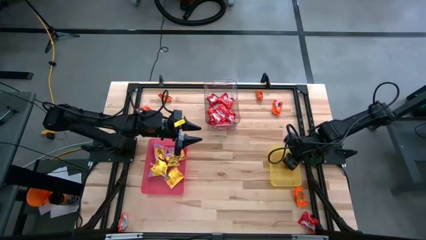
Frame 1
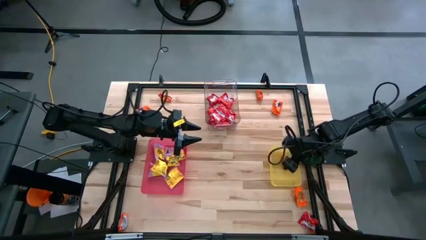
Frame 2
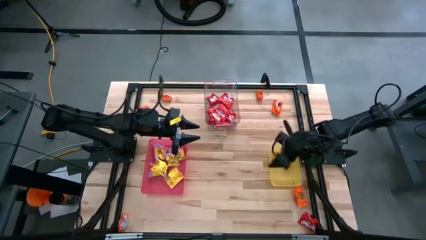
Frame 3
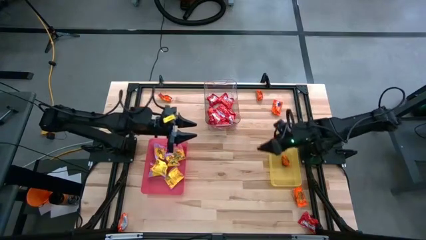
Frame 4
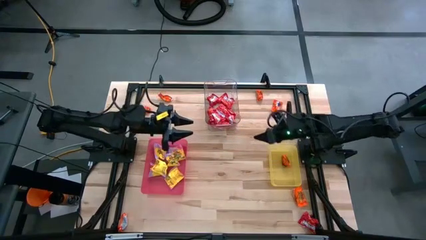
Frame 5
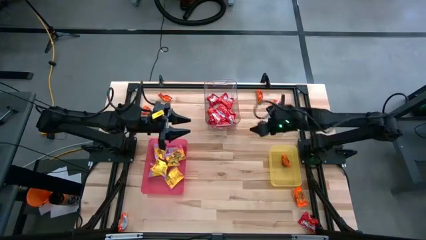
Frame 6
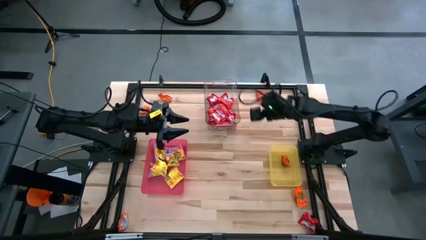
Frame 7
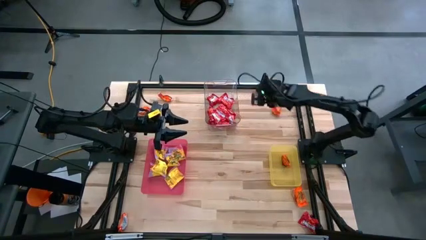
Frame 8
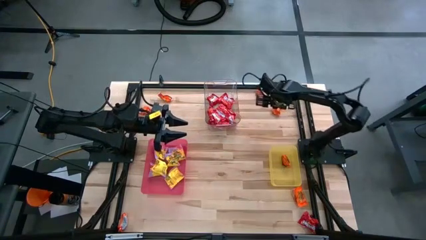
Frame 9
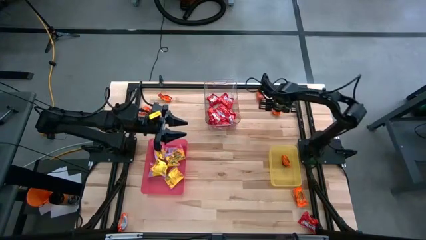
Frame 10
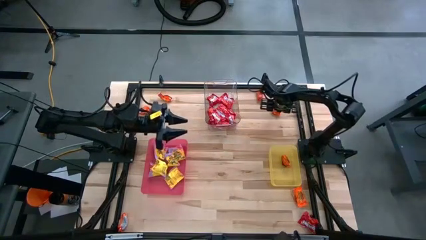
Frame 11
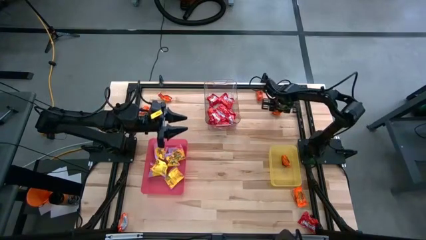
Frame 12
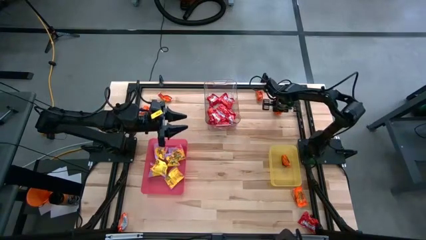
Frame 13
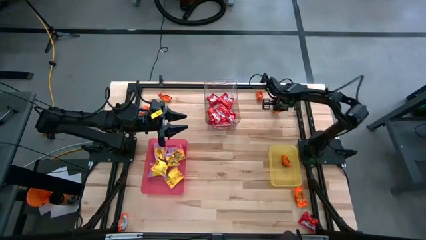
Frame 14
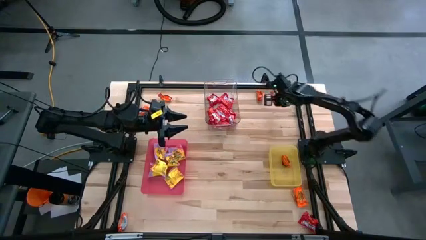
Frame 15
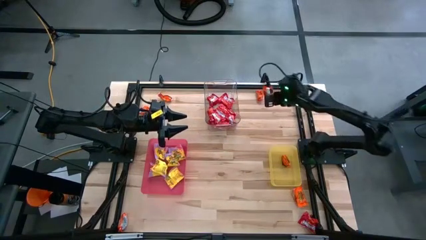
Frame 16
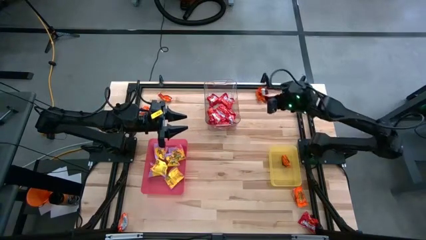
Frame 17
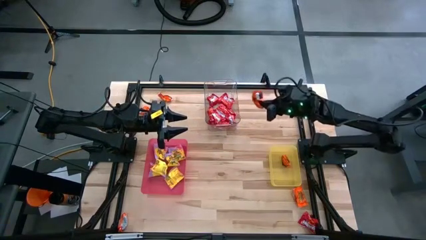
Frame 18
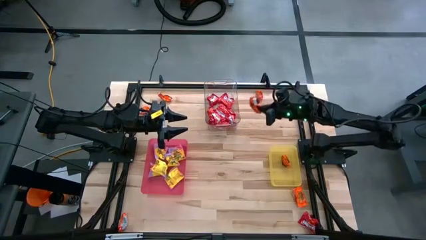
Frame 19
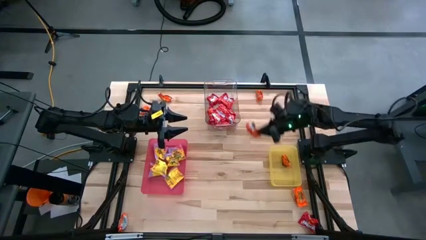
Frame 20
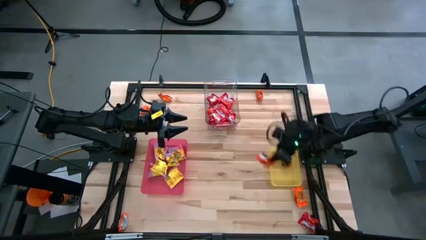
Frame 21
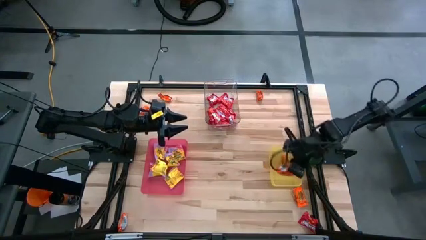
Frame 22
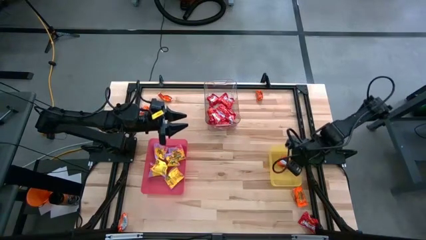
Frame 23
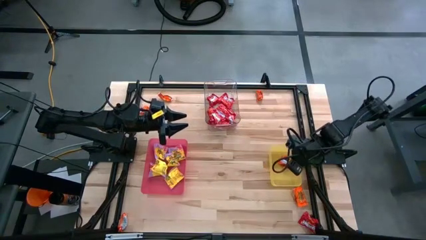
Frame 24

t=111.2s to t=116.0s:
Task: Sort candy
Put the orange candy into the yellow bin

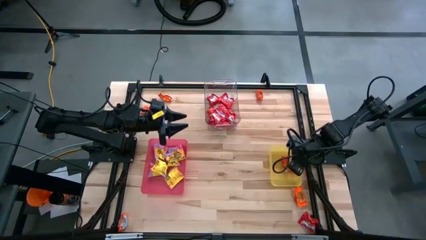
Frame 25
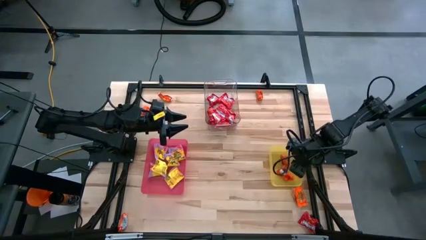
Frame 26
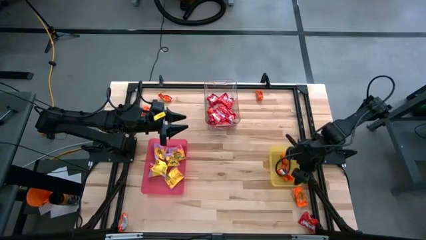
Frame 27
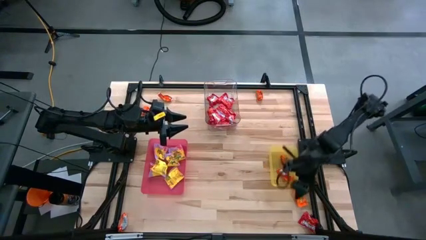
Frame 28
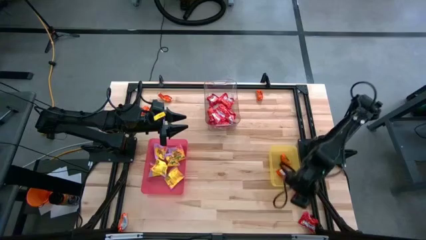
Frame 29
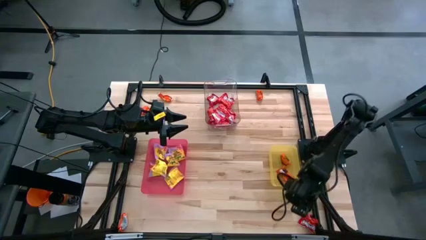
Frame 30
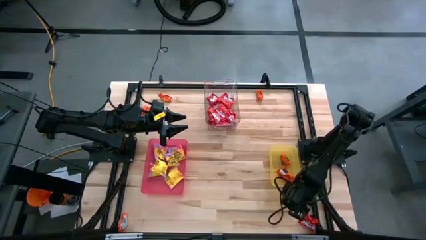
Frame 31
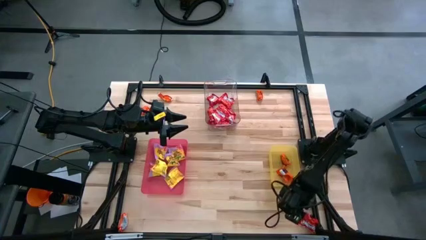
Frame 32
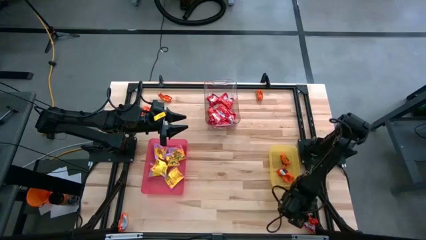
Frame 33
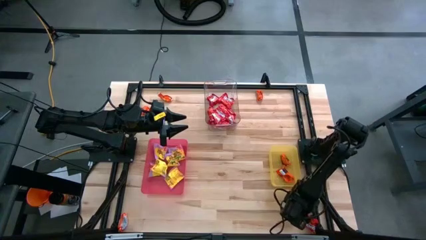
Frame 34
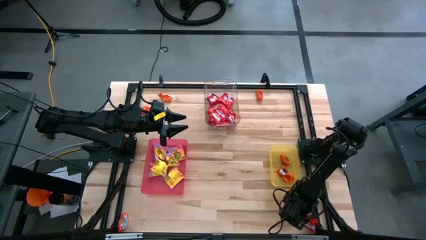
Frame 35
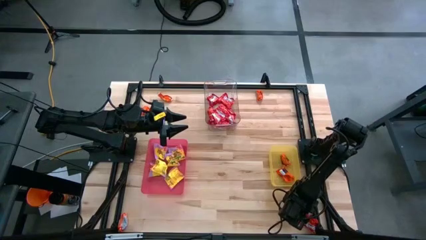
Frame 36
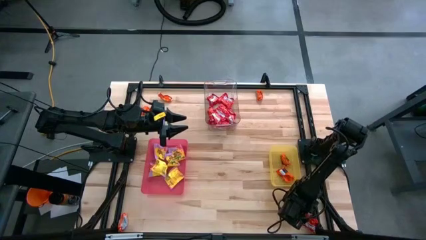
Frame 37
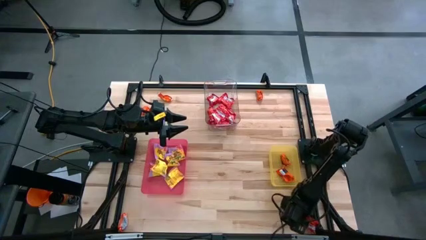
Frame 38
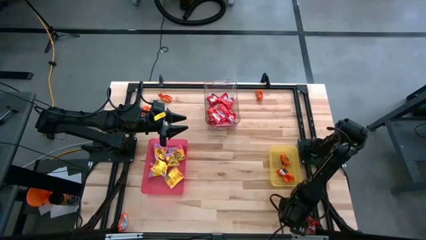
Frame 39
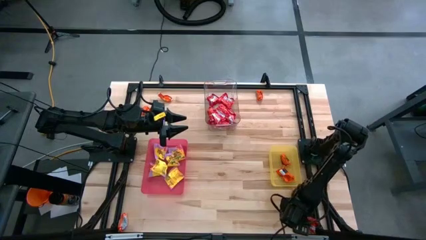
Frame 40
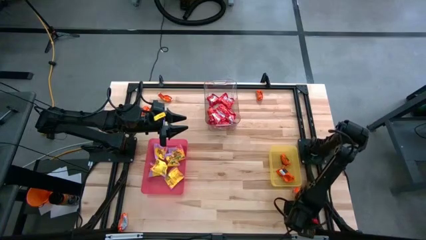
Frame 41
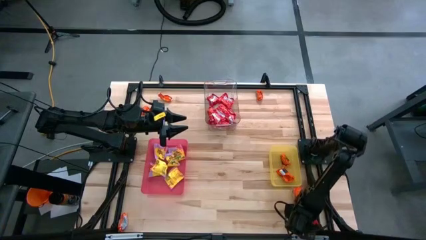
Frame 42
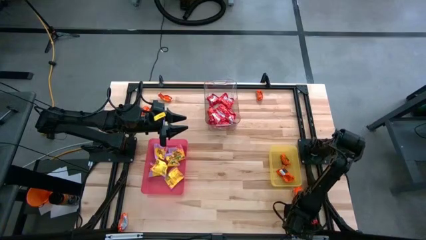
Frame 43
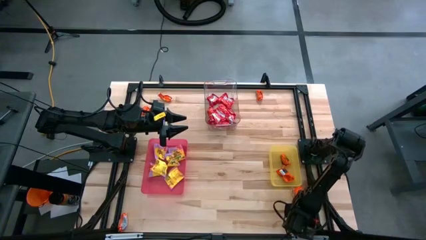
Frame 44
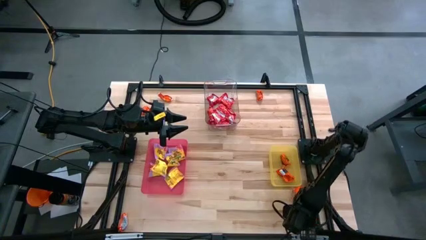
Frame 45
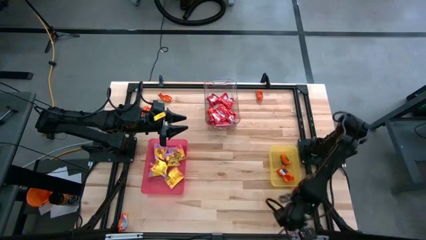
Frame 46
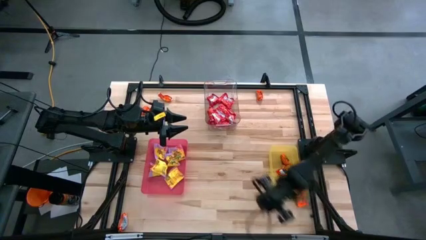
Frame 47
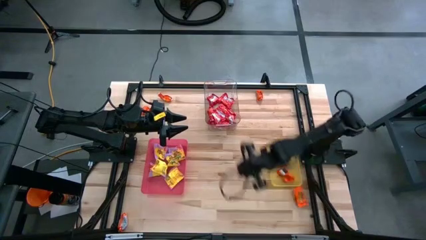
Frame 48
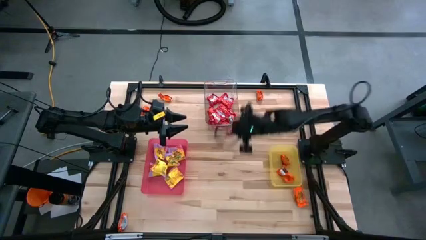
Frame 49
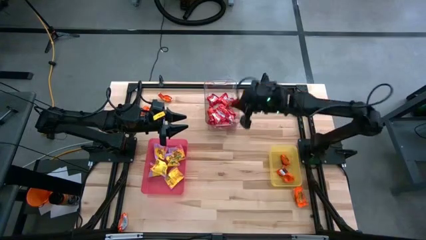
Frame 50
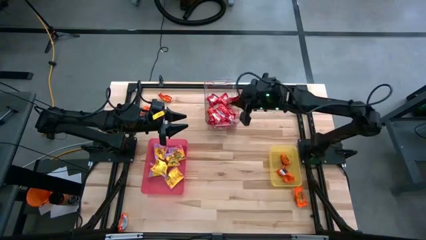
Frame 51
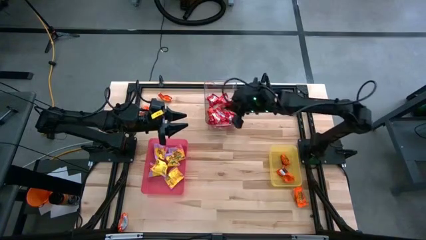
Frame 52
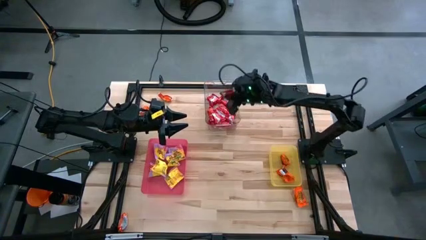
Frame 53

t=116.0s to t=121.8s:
Put the red candy into the transparent bin

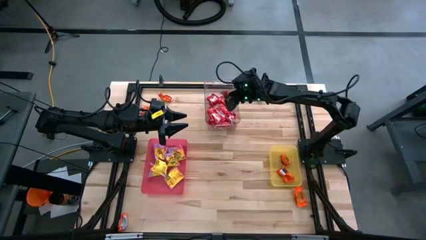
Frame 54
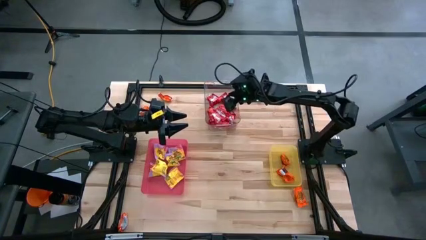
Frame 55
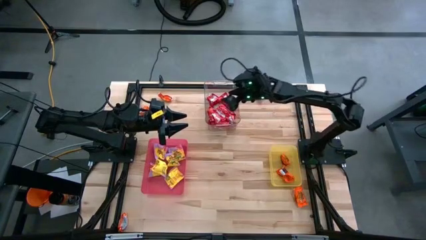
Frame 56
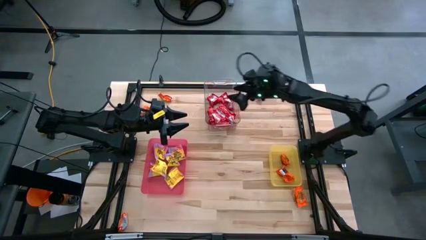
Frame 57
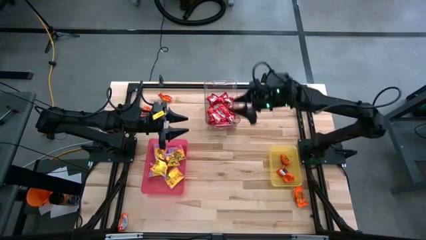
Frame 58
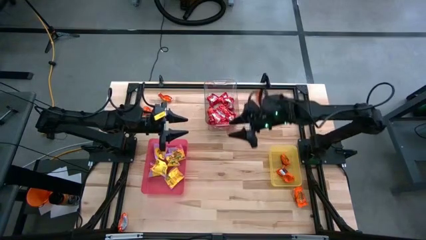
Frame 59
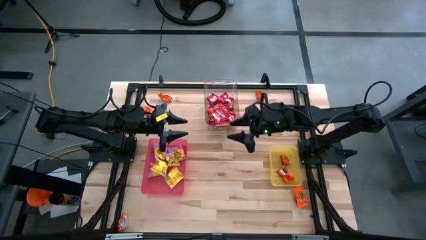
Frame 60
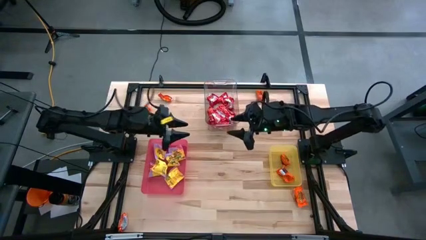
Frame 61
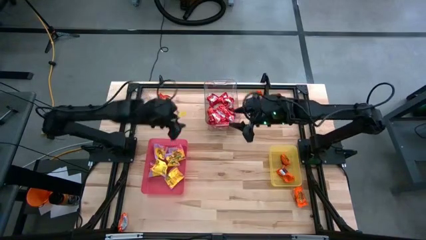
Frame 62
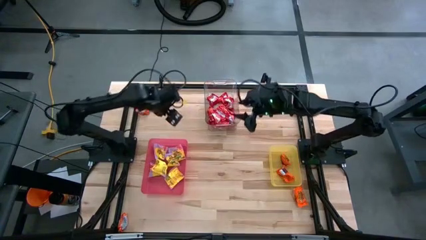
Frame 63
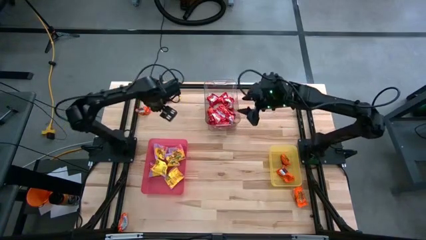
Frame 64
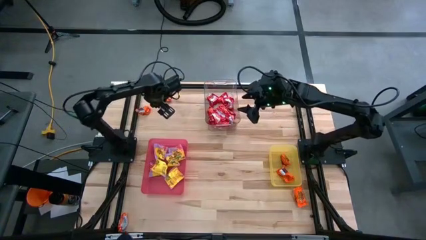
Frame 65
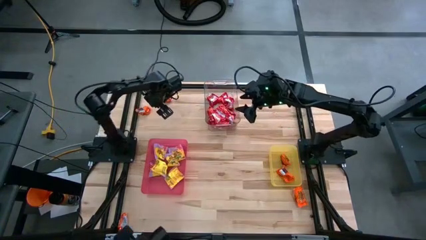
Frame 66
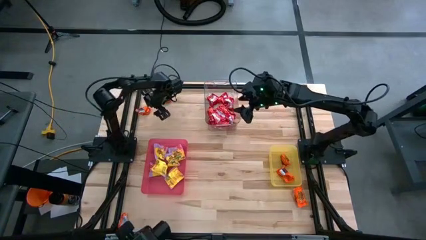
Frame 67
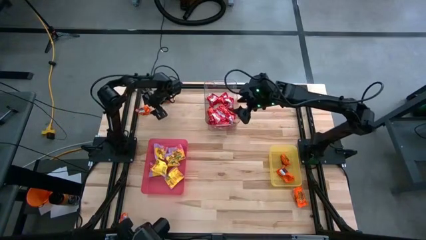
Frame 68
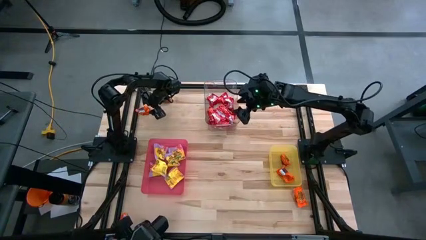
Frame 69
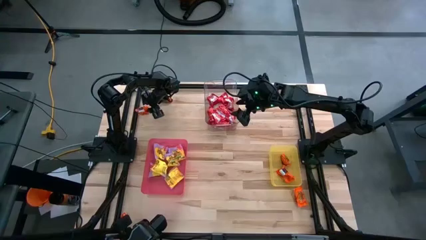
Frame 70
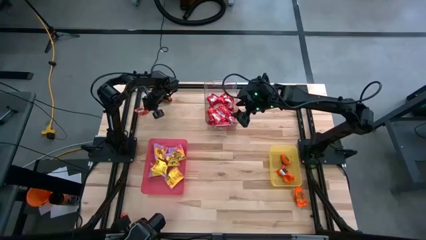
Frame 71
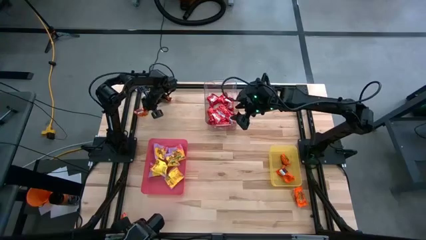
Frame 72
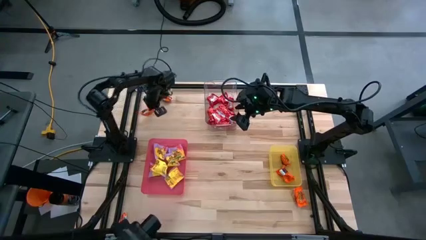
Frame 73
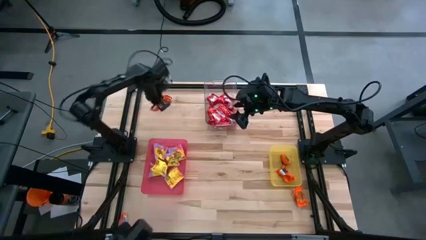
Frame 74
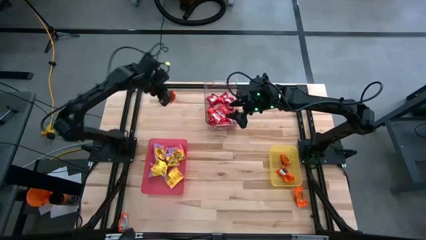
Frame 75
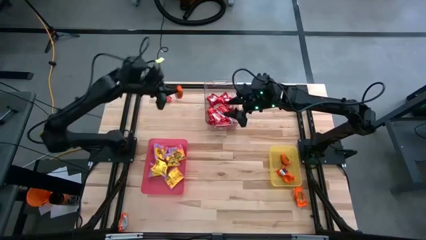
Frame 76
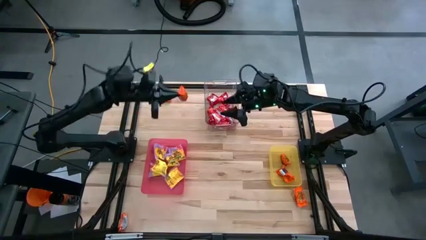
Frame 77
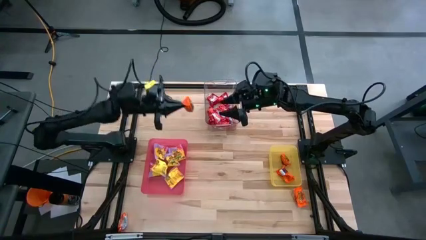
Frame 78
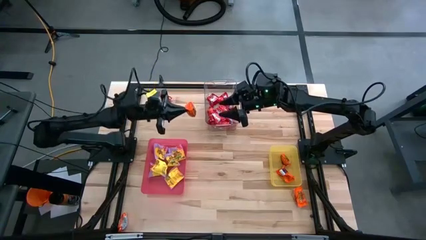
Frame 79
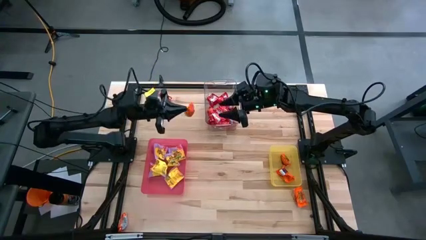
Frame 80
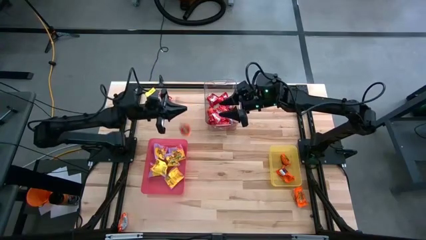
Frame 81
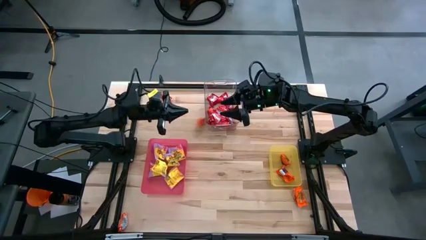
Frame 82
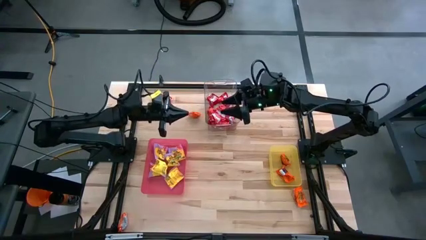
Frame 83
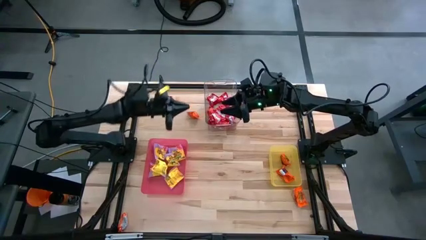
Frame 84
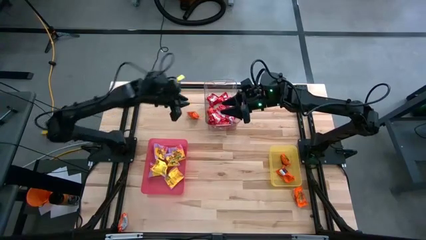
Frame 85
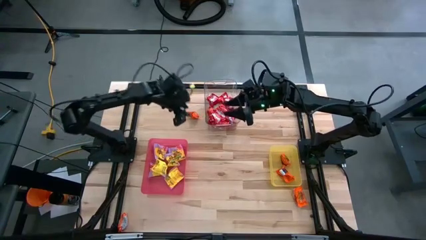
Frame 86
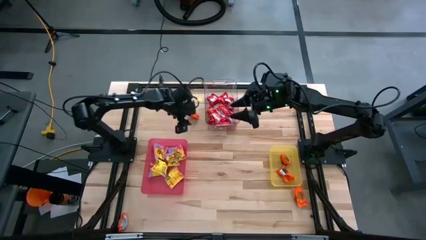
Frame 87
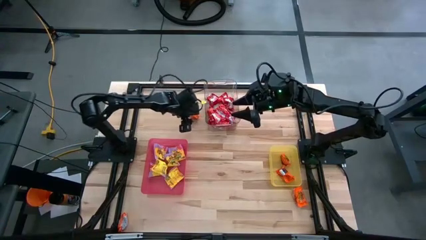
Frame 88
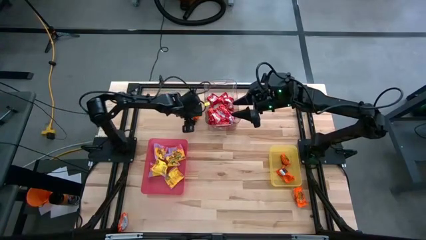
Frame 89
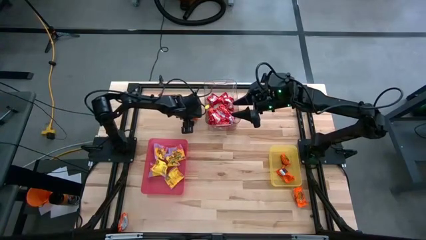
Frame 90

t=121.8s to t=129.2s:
Put the orange candy into the yellow bin
